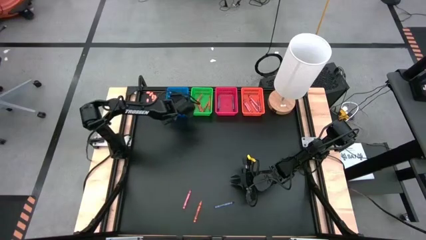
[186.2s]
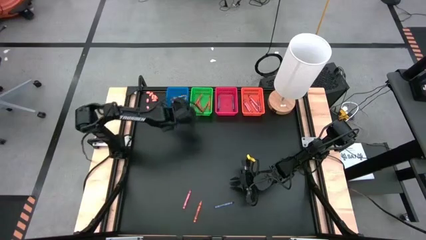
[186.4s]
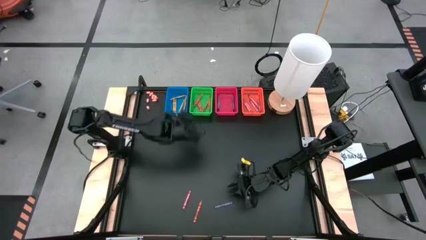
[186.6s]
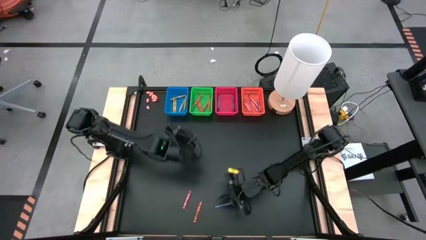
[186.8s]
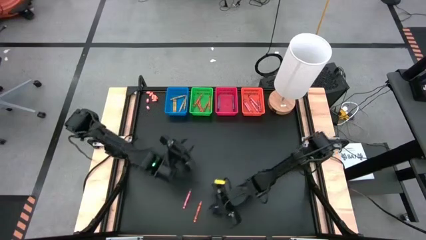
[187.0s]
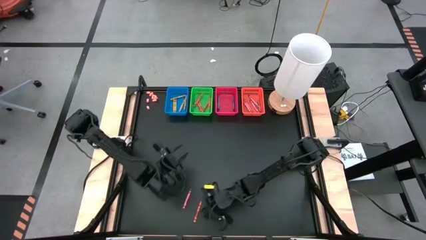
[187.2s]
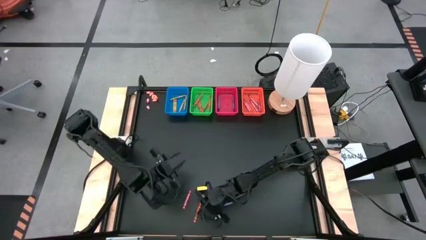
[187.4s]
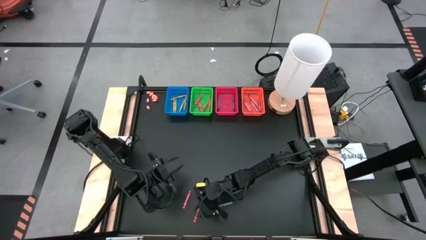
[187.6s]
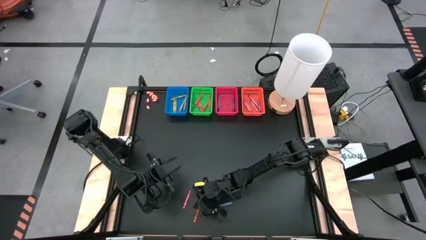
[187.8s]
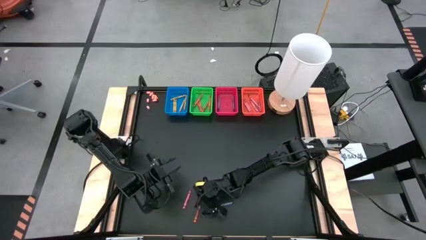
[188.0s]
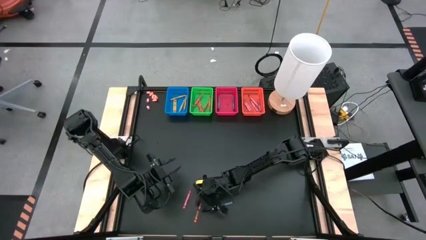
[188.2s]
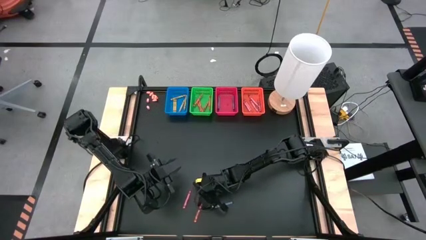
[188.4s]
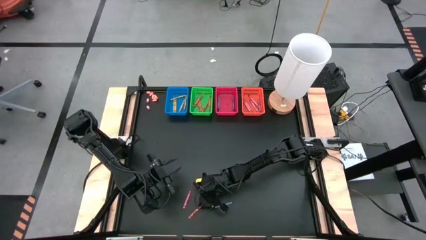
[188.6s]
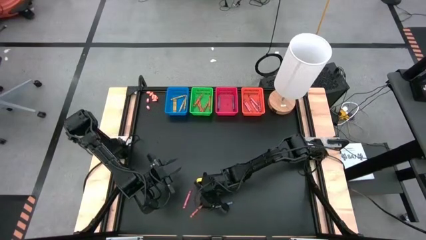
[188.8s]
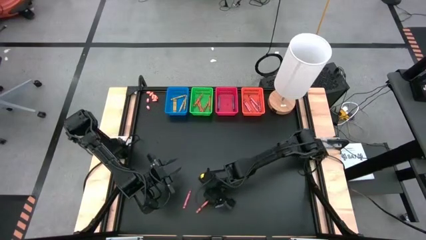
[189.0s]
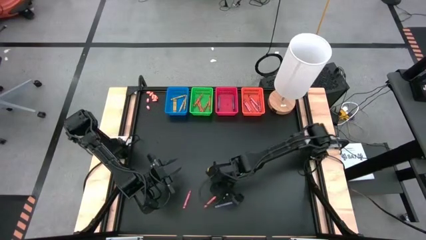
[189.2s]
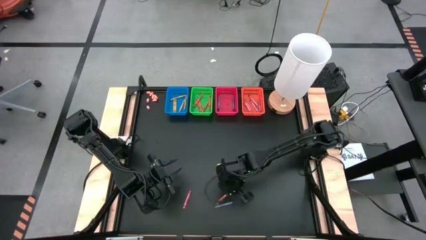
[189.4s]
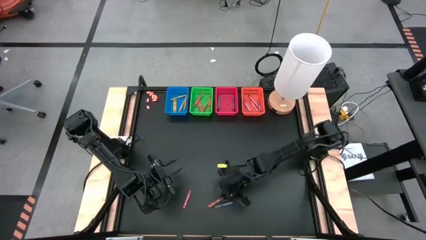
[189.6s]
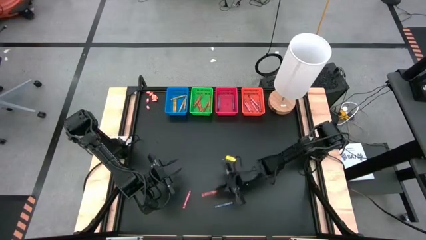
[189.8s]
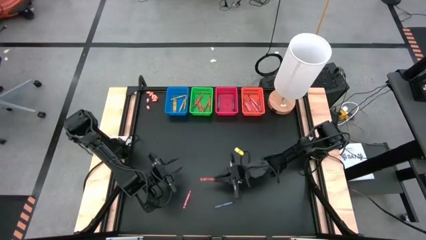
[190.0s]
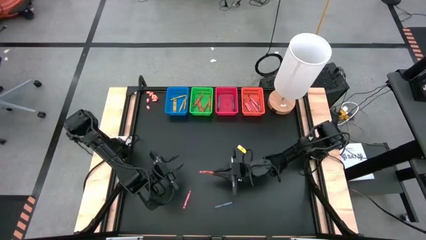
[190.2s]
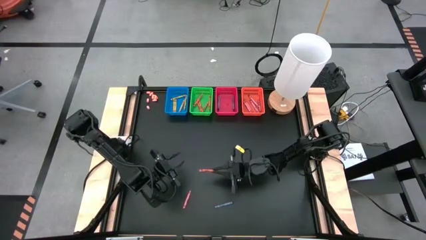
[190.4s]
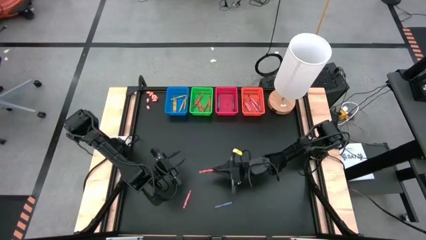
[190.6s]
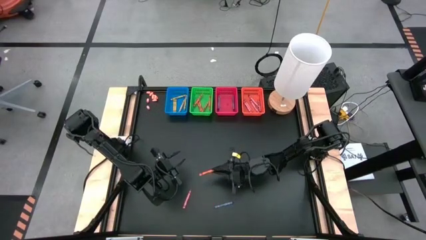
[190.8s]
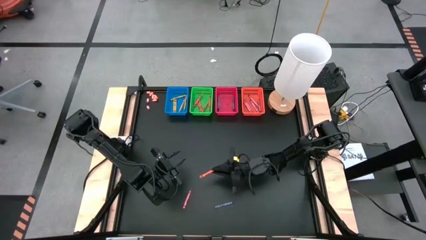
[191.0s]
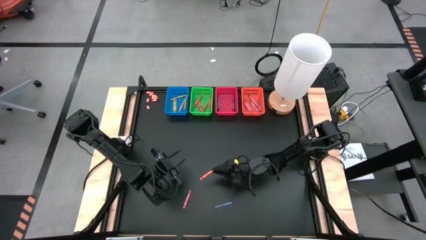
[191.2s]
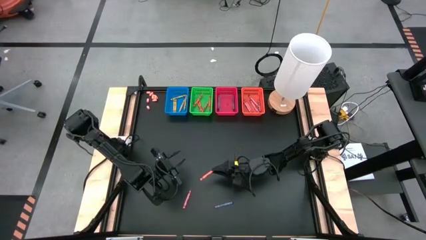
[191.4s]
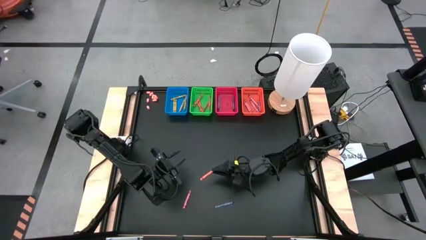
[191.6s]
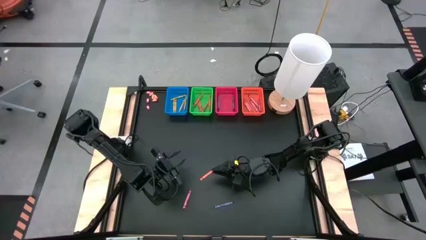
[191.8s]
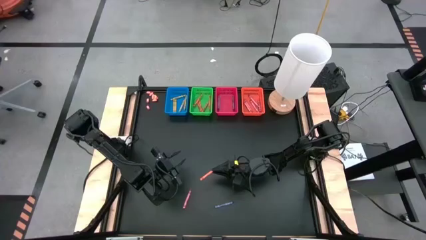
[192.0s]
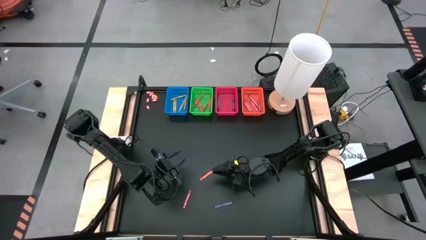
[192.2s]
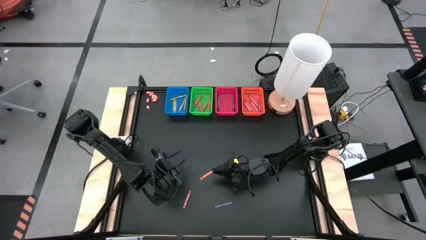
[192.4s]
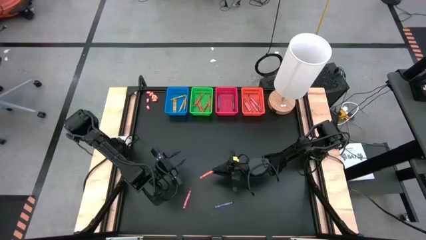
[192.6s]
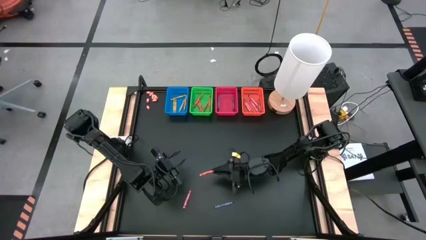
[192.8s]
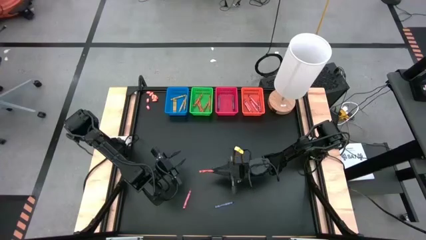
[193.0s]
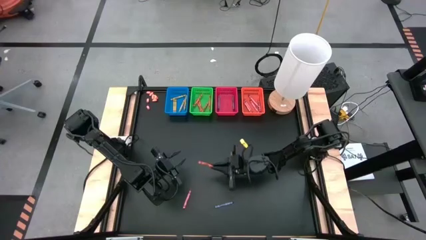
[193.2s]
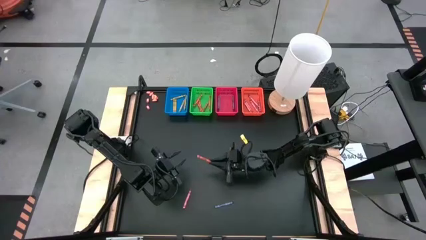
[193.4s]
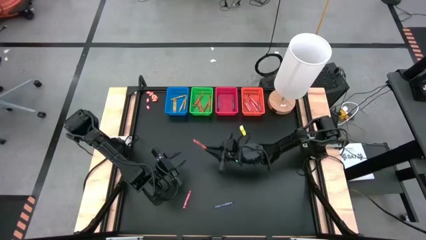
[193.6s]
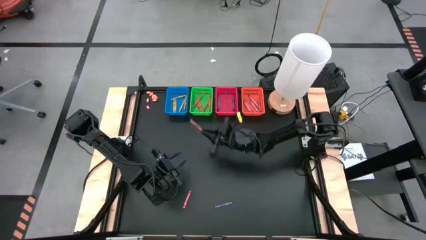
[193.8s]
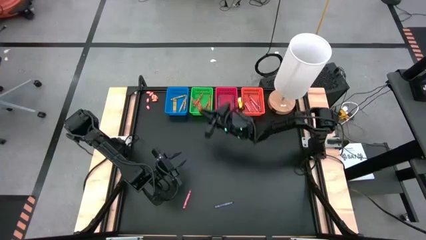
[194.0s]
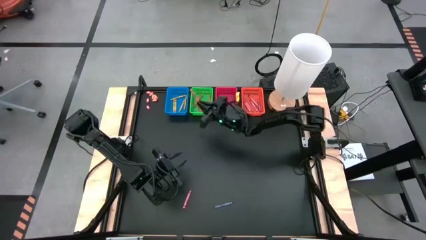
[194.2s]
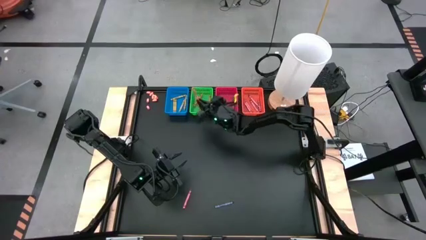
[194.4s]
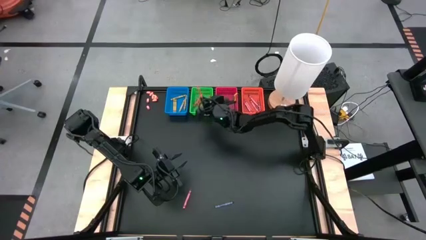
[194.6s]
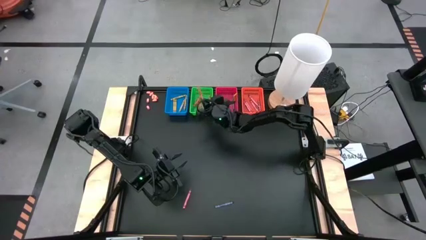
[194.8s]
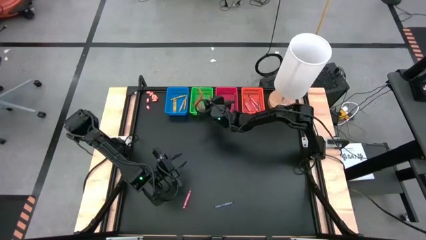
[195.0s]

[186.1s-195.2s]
Task: Sort crayons
Put the orange crayon into the green bin

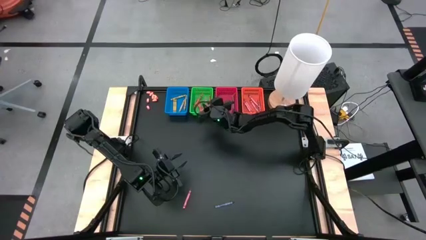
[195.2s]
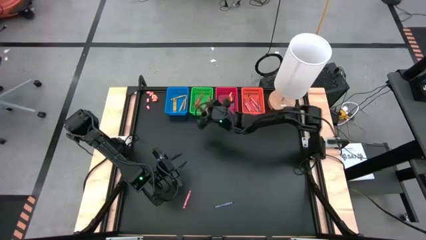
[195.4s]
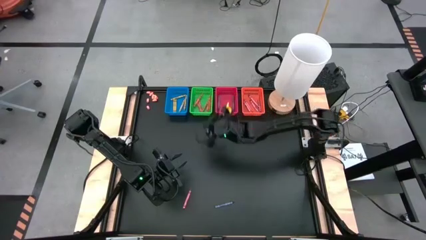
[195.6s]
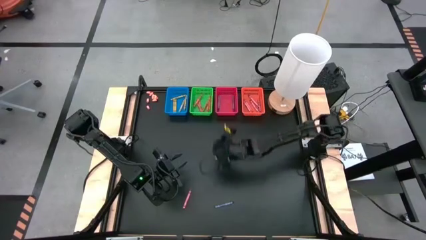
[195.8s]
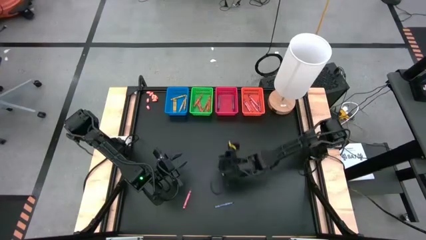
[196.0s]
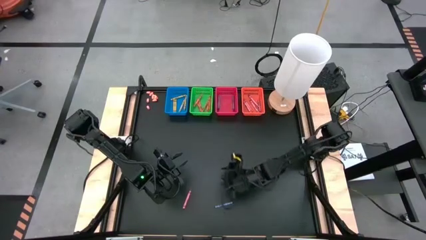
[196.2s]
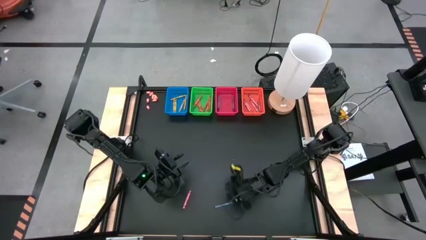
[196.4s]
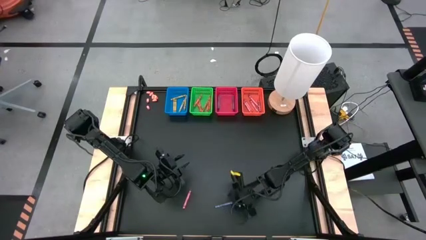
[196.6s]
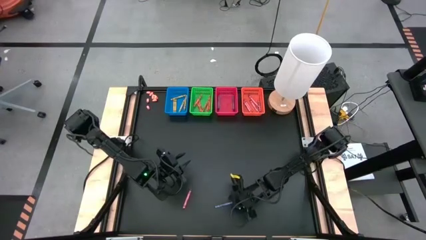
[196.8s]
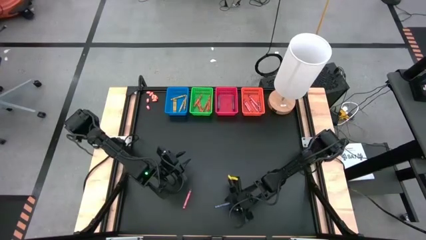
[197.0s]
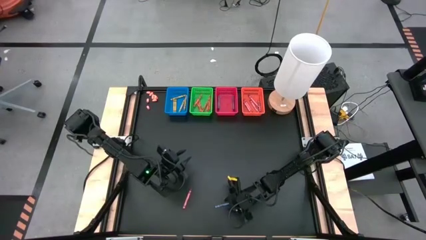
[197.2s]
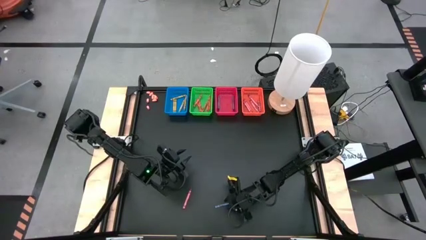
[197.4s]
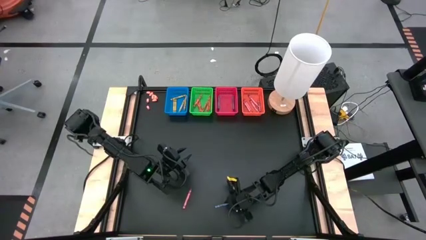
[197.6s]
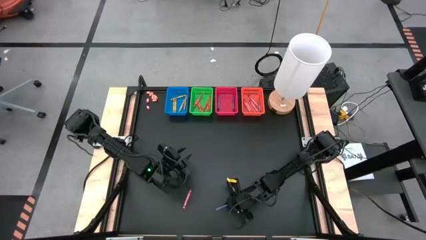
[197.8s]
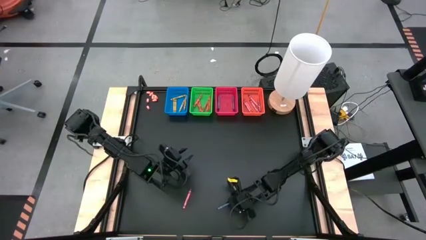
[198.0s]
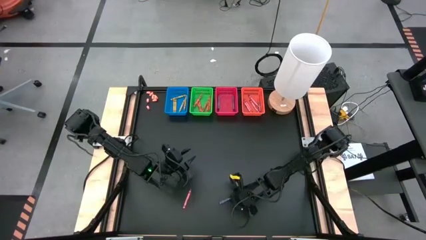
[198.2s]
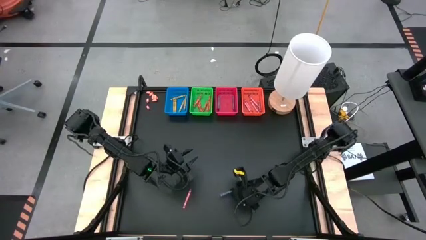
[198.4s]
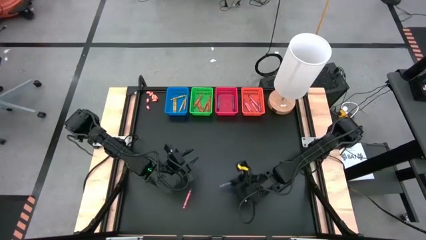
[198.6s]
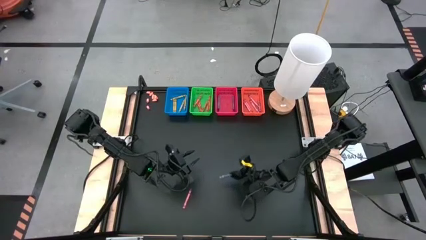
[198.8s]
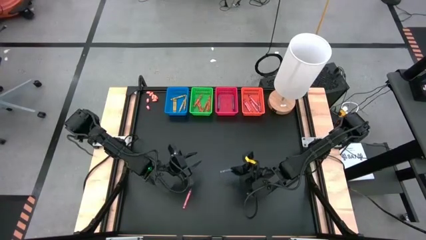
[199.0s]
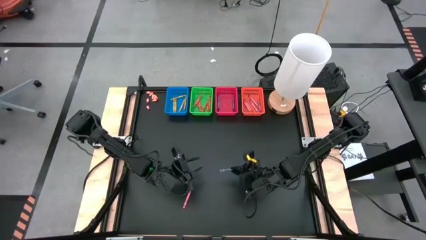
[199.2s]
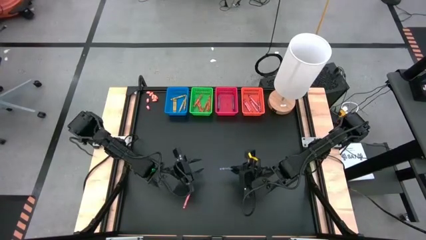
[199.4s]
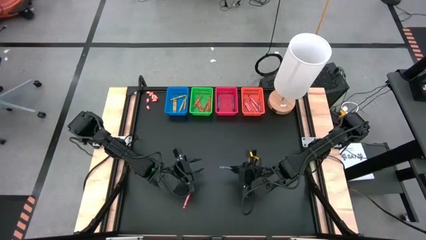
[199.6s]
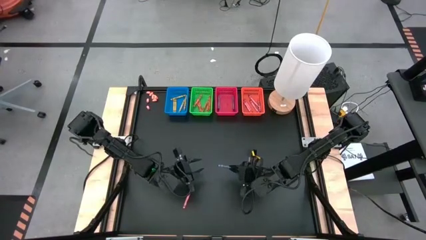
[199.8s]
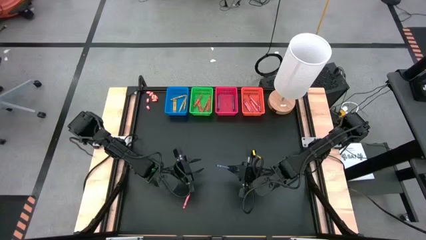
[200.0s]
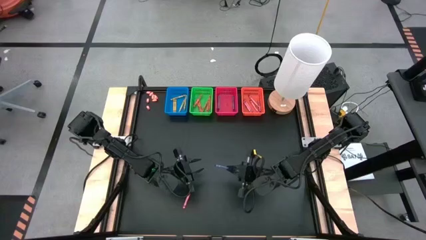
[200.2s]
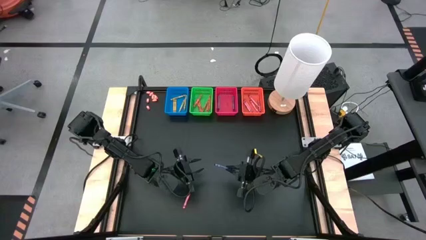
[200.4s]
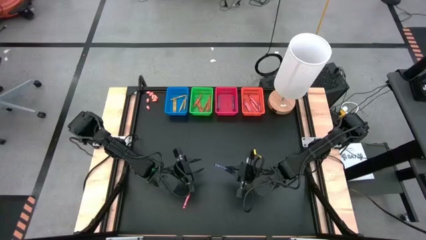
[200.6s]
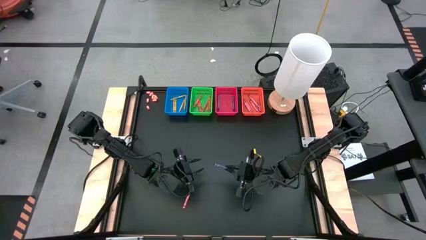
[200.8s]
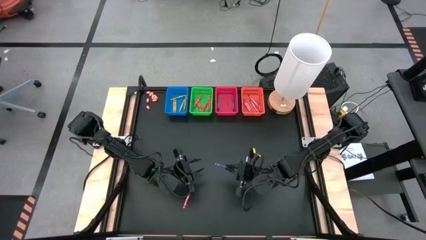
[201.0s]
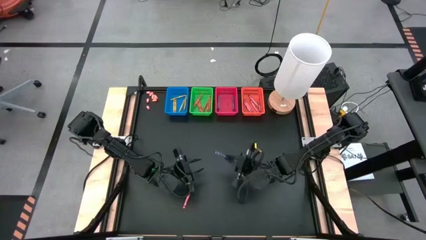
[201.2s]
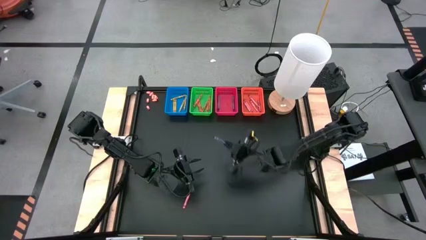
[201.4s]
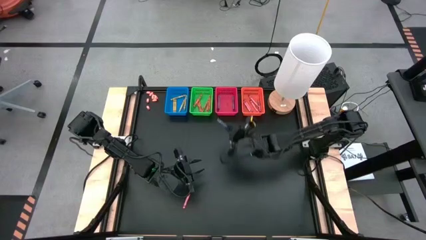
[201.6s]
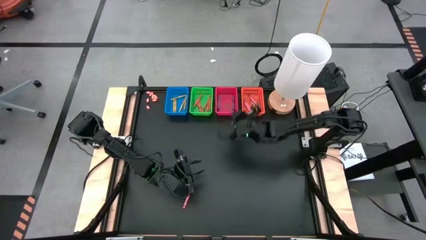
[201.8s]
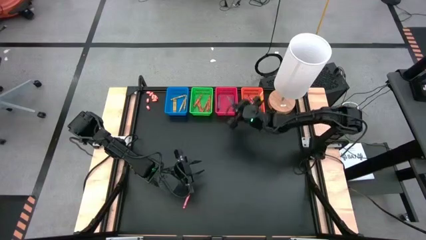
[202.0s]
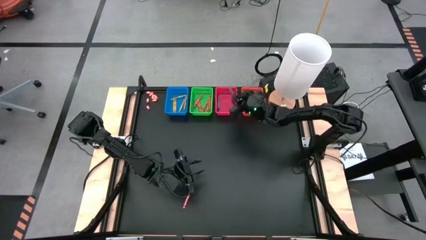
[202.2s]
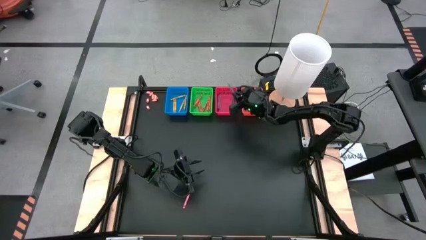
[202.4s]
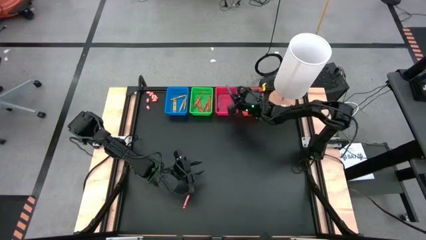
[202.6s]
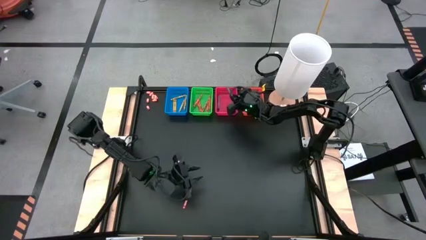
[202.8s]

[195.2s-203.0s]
Put the blue crayon into the red bin
